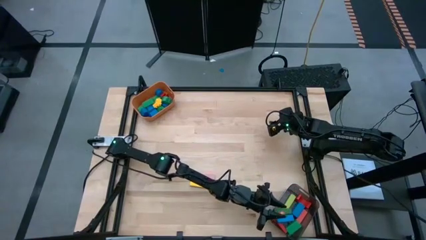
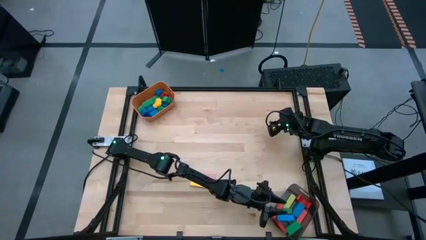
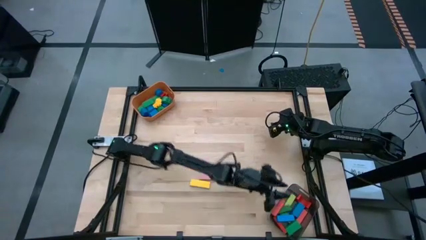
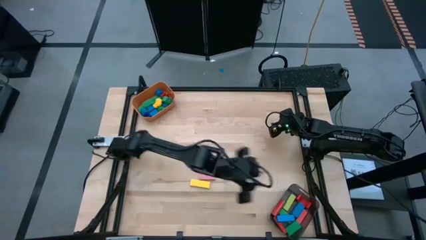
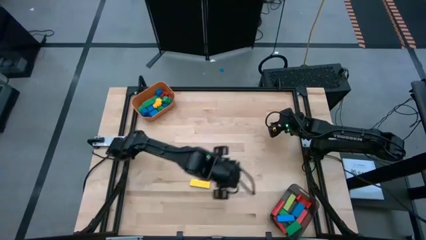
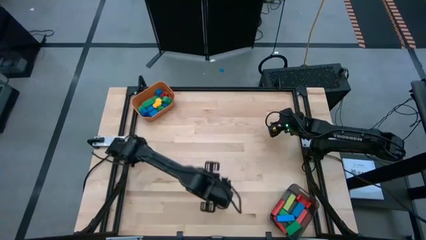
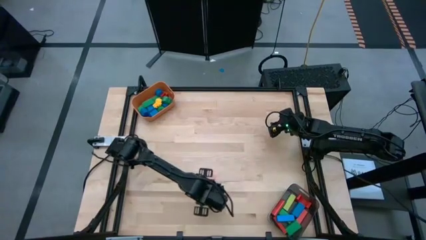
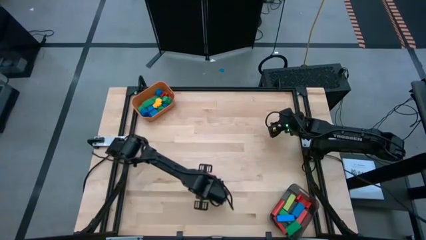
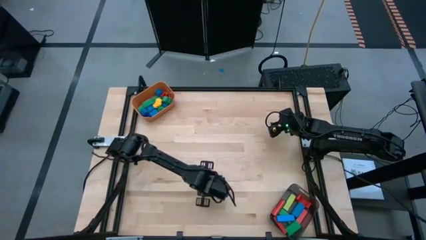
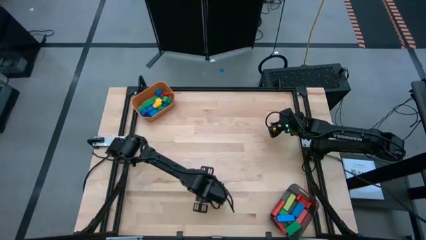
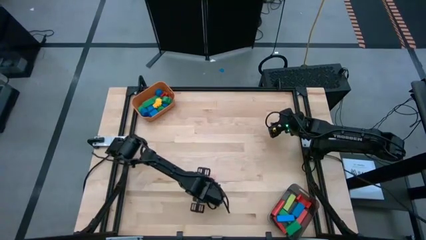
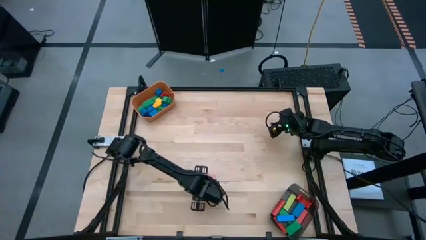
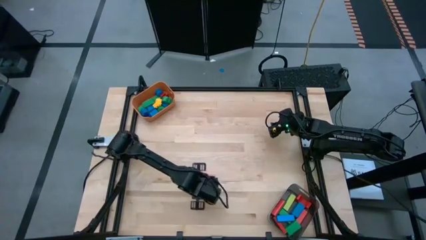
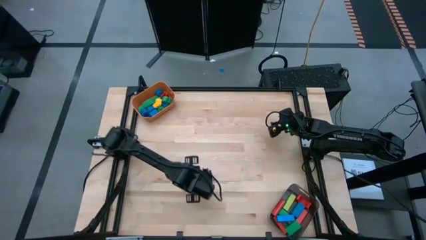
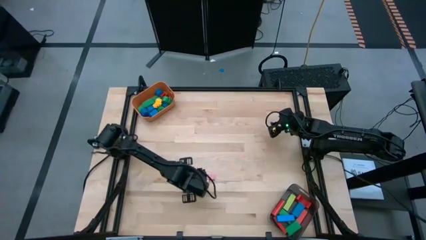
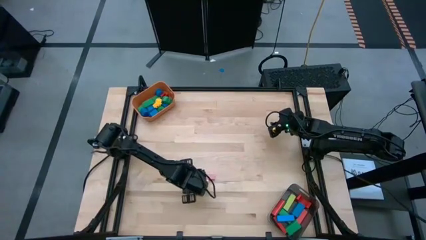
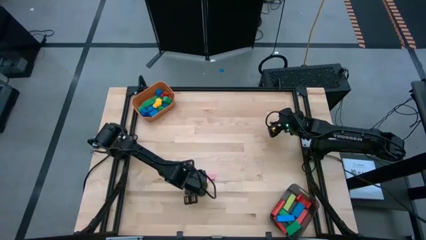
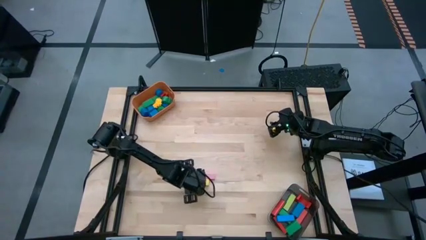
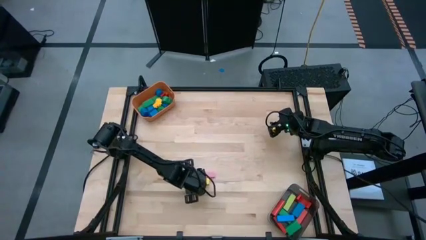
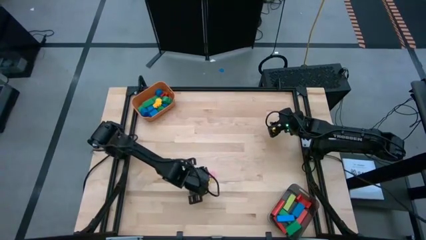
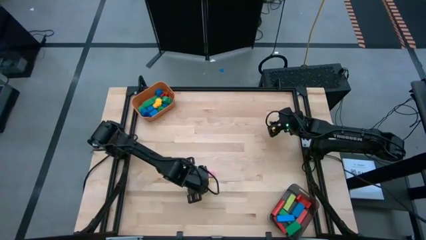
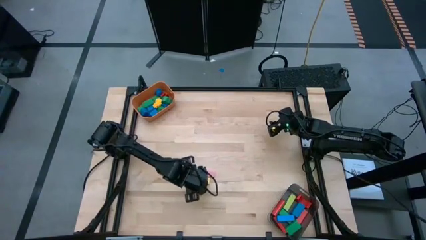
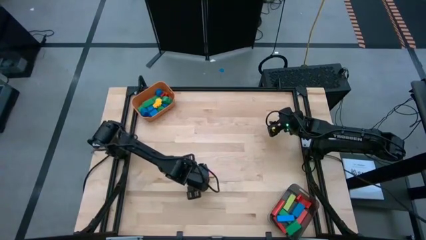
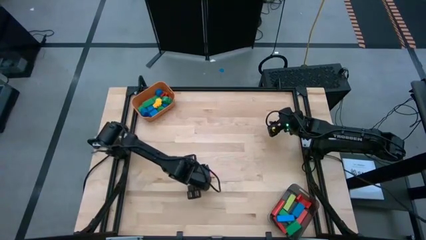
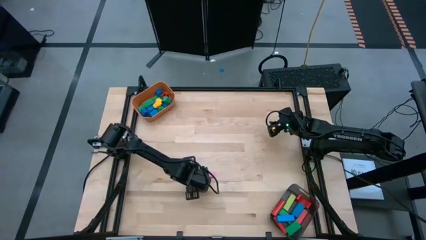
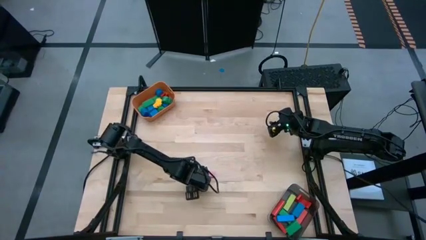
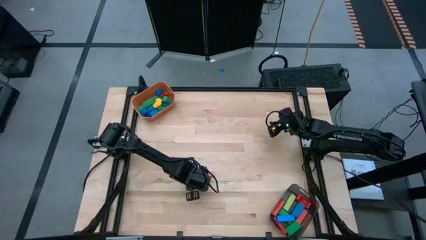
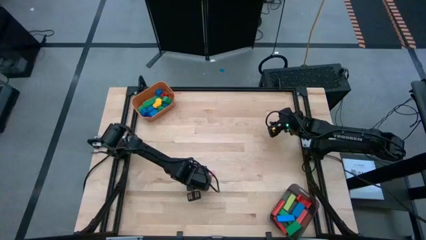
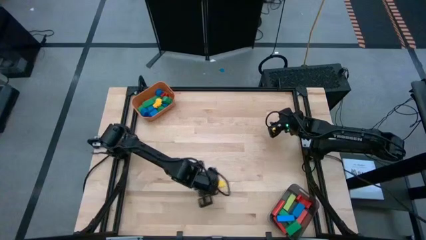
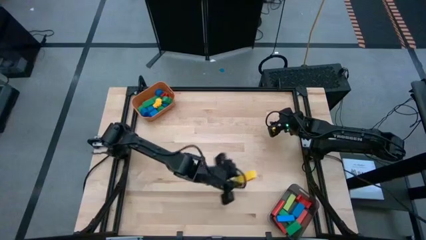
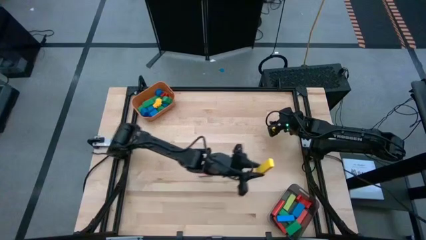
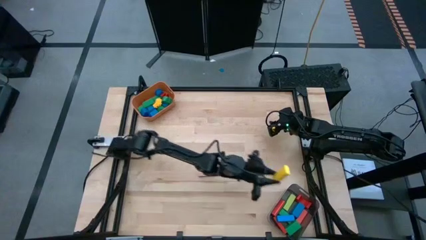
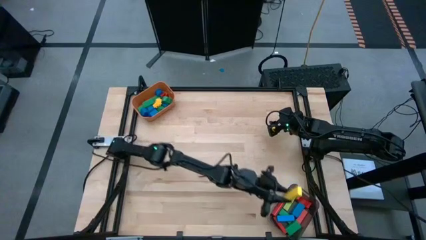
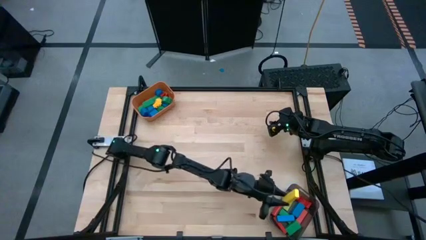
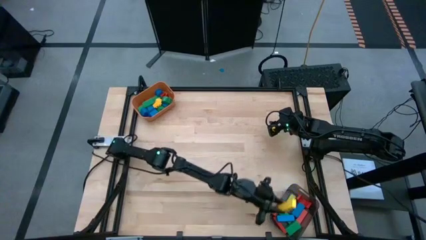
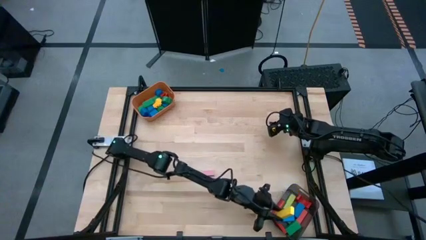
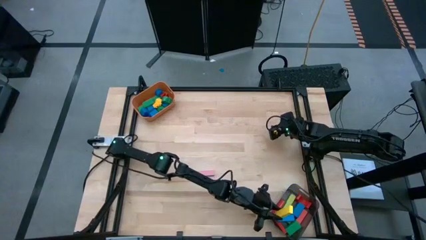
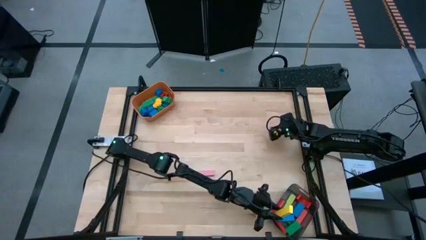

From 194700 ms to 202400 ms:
Task: Sort blocks by size
Put the big yellow block into the black bin

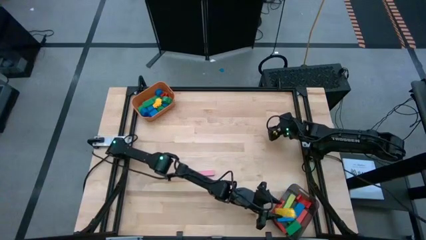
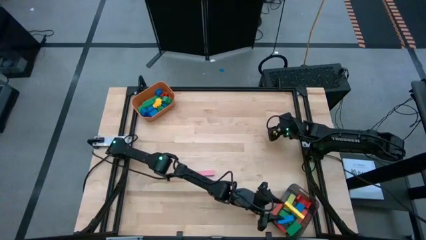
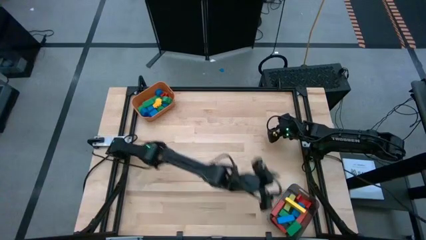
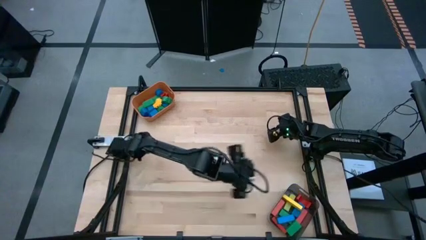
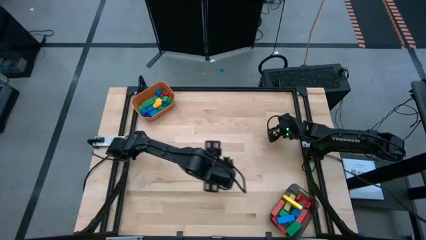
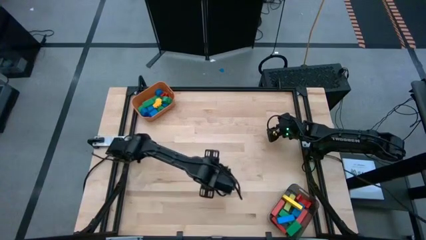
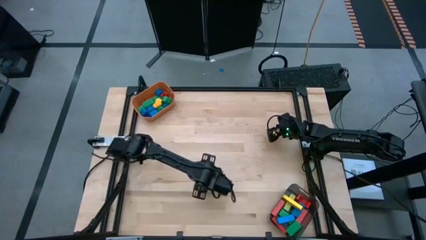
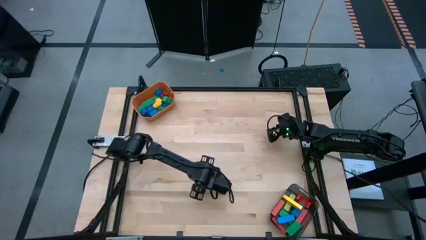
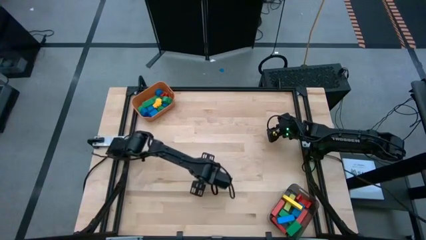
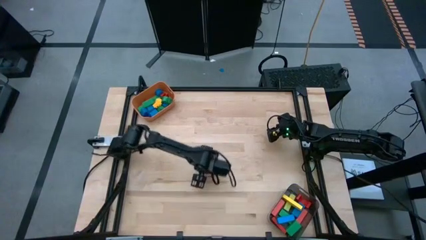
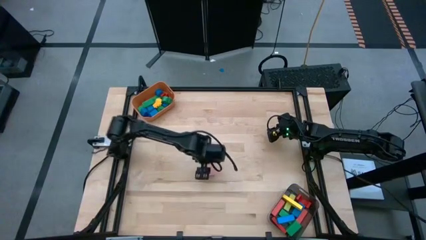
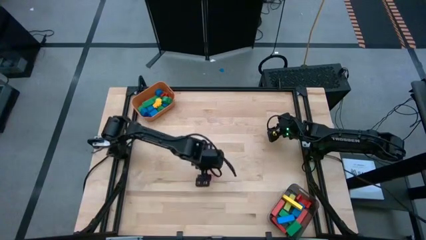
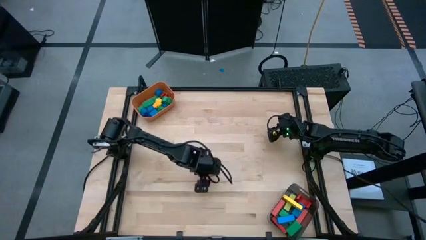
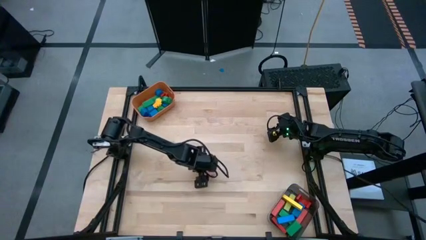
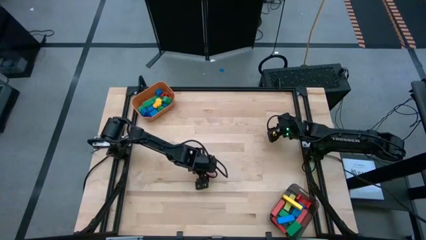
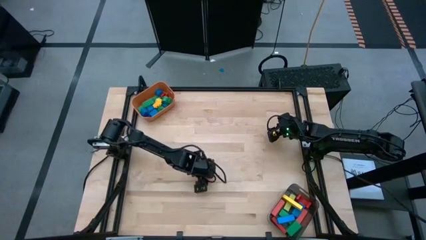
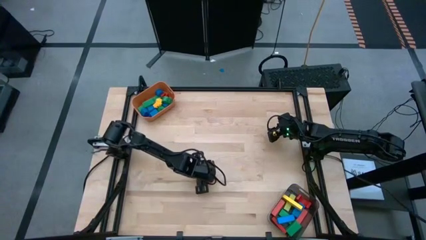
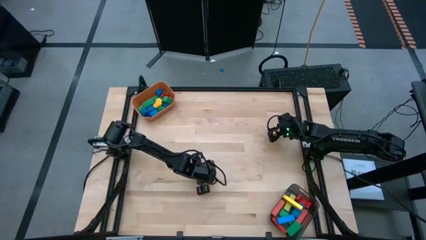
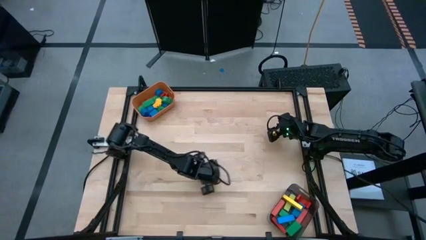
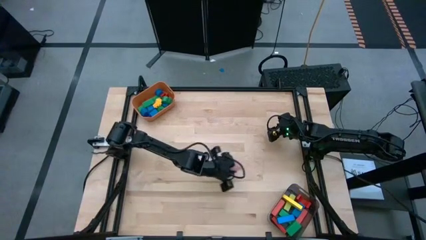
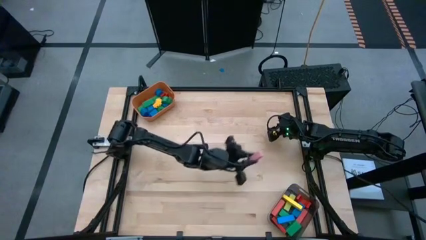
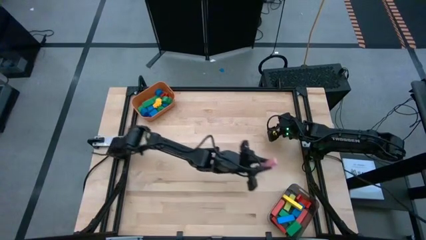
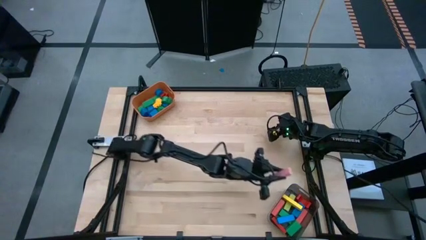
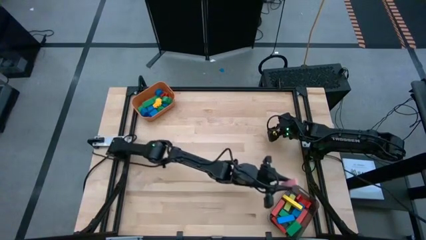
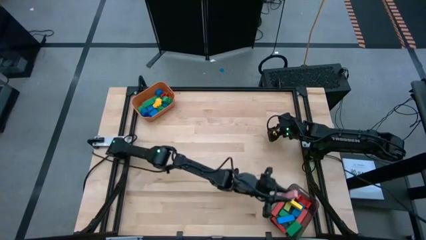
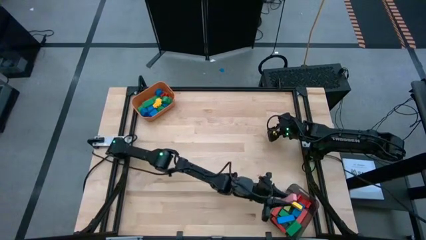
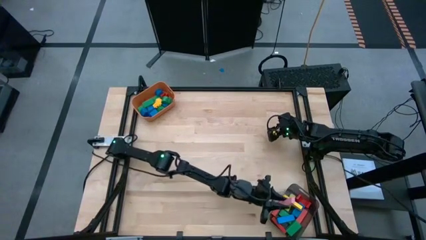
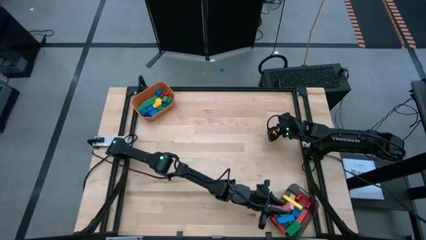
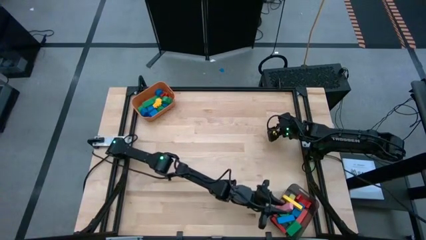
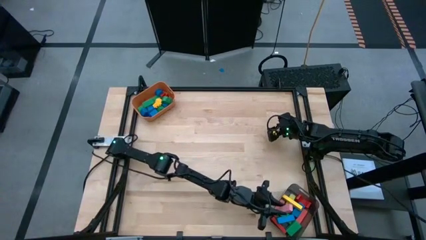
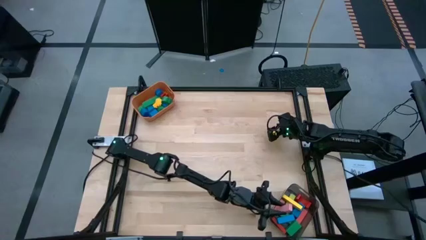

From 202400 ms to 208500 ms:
Put the big light red block into the black bin
